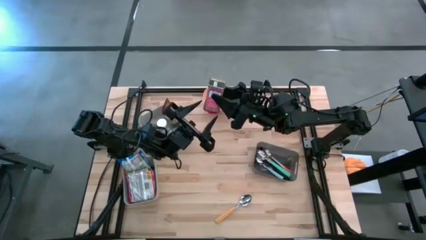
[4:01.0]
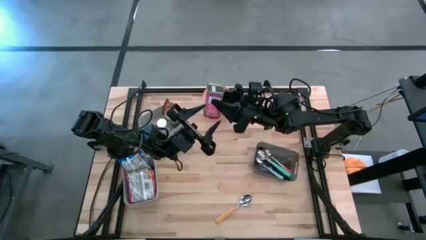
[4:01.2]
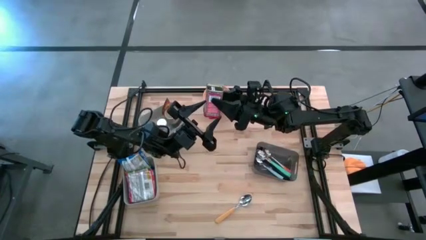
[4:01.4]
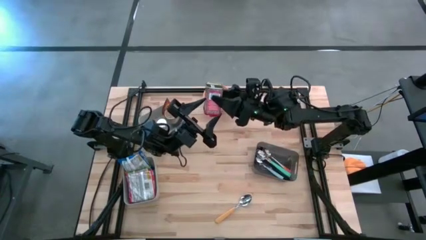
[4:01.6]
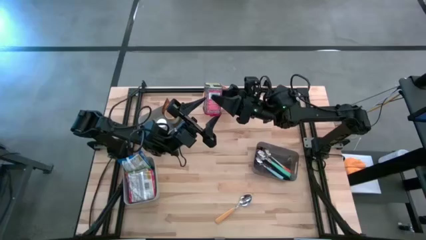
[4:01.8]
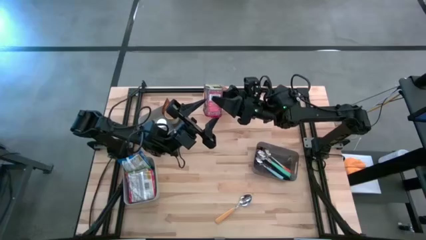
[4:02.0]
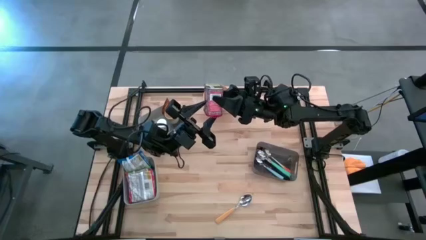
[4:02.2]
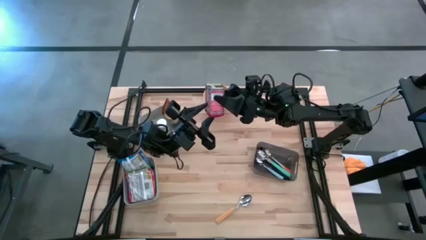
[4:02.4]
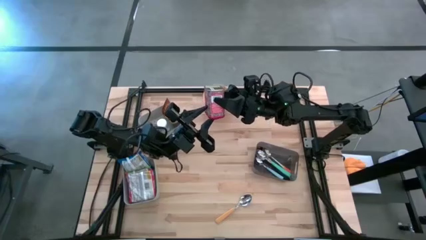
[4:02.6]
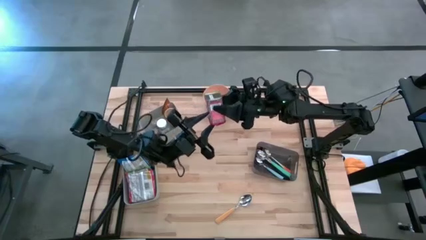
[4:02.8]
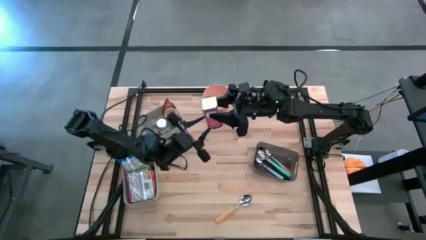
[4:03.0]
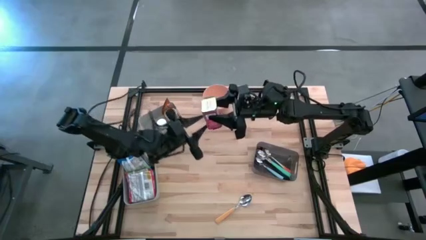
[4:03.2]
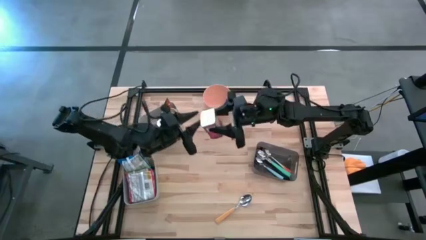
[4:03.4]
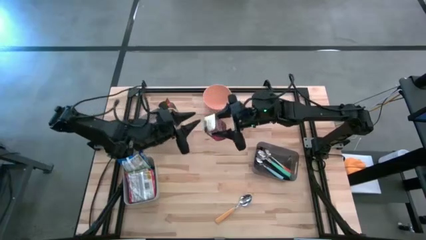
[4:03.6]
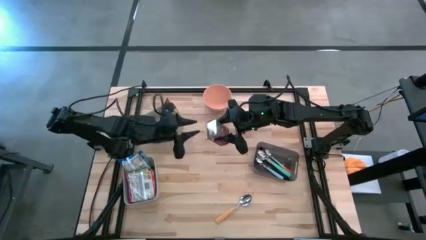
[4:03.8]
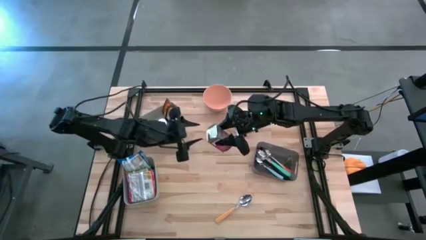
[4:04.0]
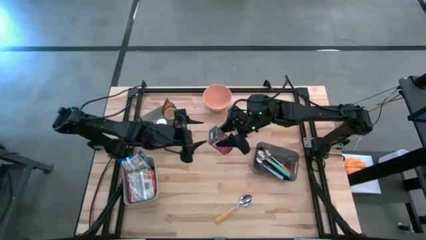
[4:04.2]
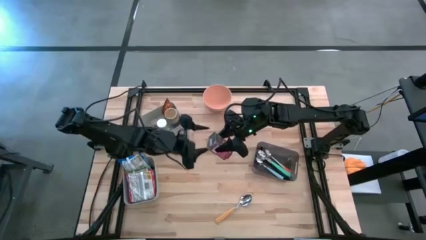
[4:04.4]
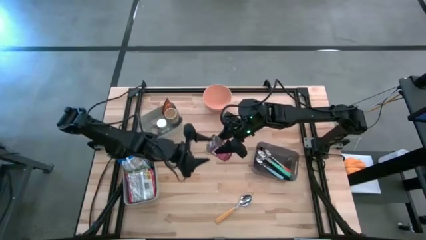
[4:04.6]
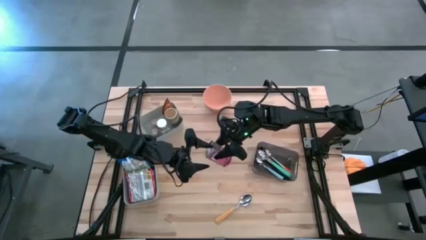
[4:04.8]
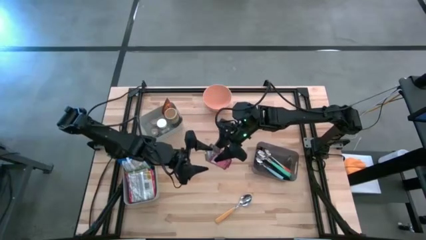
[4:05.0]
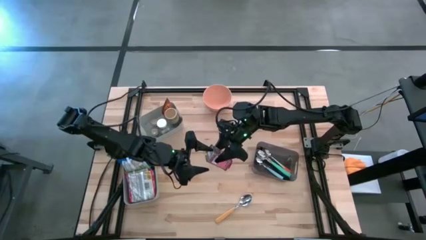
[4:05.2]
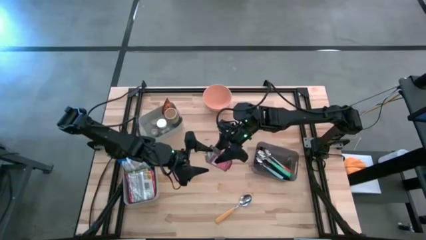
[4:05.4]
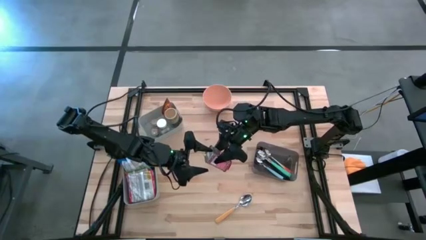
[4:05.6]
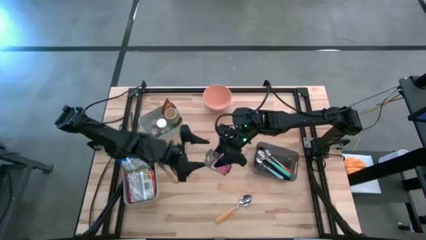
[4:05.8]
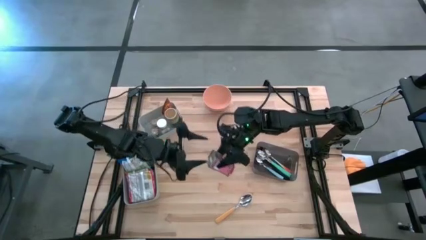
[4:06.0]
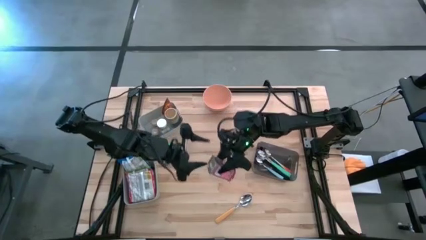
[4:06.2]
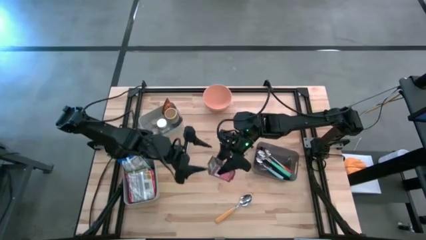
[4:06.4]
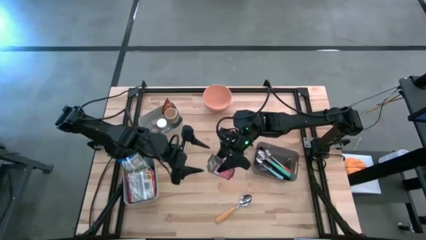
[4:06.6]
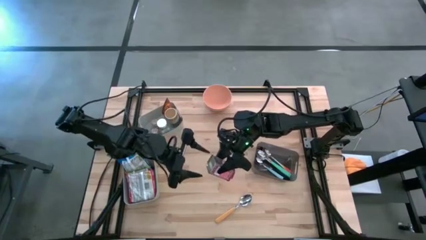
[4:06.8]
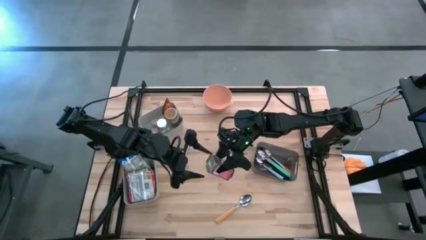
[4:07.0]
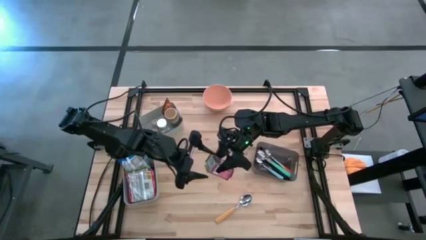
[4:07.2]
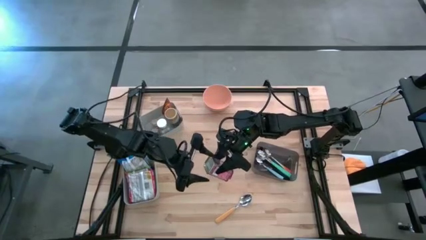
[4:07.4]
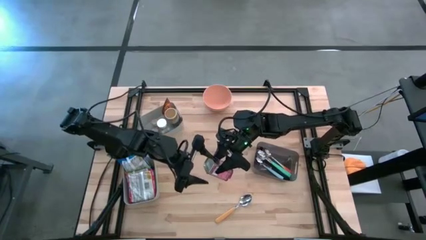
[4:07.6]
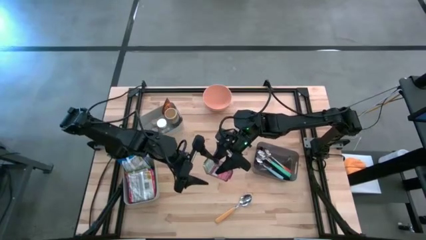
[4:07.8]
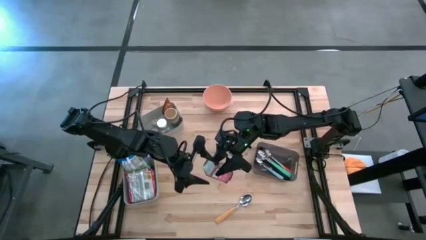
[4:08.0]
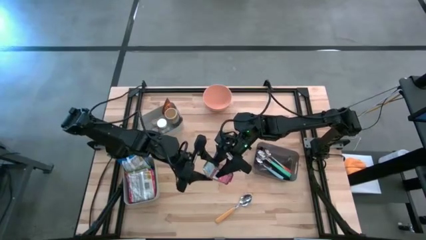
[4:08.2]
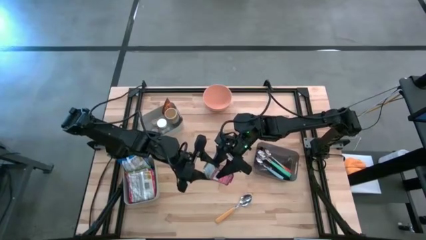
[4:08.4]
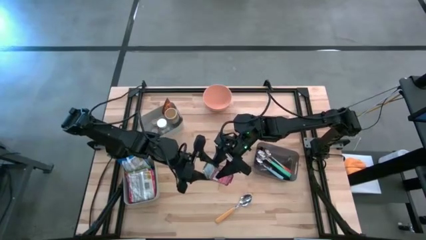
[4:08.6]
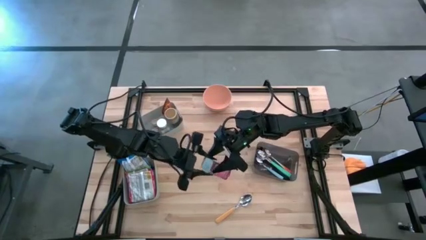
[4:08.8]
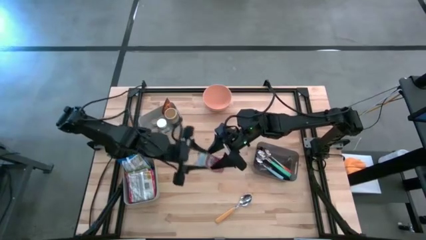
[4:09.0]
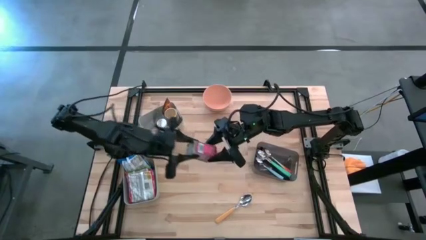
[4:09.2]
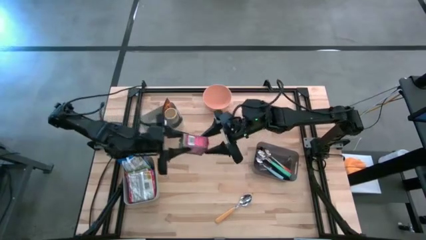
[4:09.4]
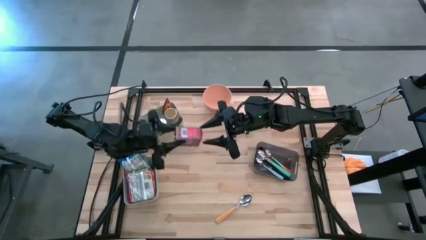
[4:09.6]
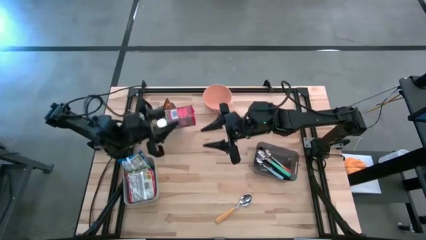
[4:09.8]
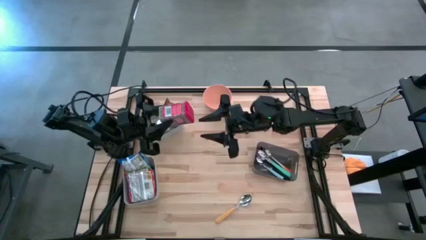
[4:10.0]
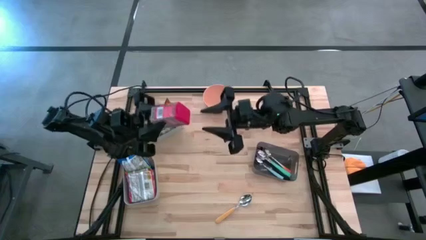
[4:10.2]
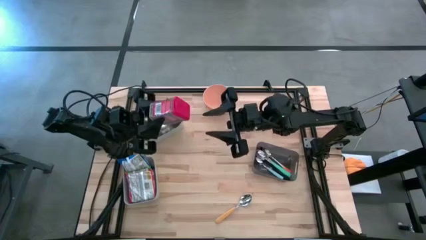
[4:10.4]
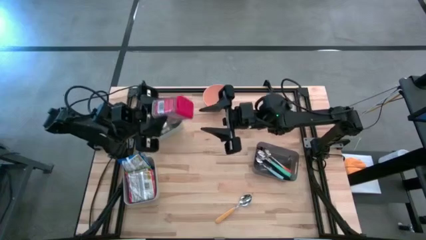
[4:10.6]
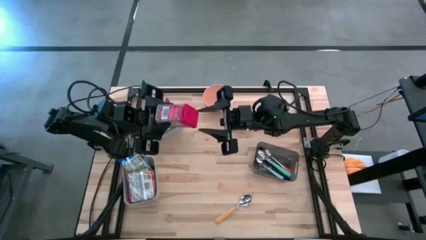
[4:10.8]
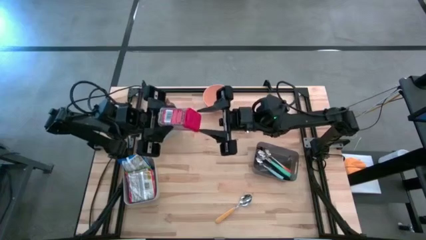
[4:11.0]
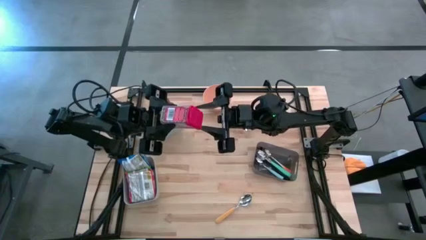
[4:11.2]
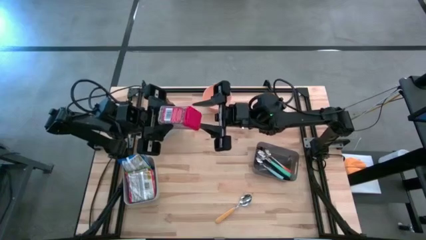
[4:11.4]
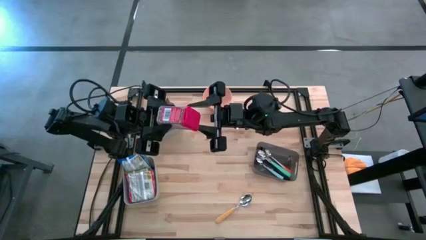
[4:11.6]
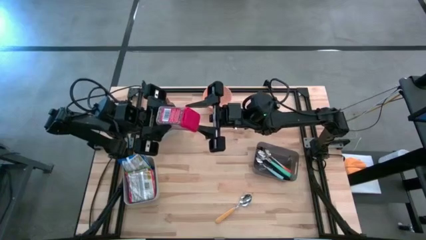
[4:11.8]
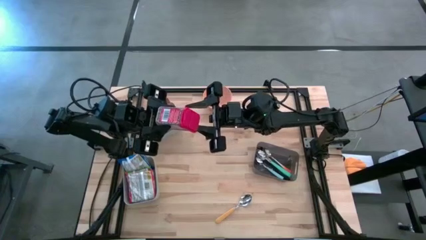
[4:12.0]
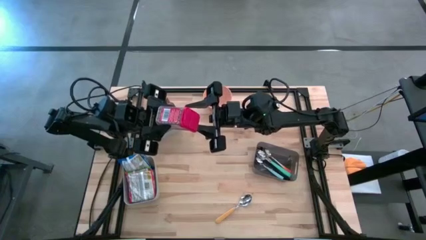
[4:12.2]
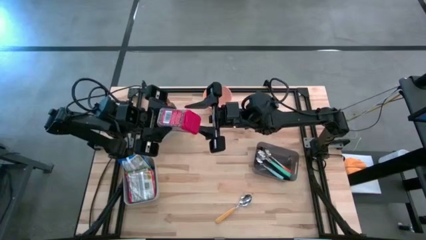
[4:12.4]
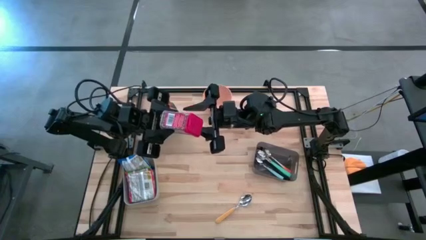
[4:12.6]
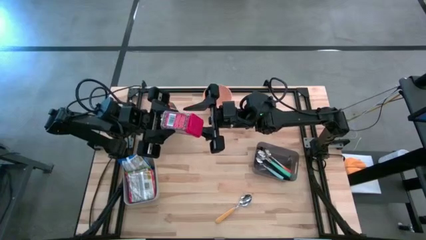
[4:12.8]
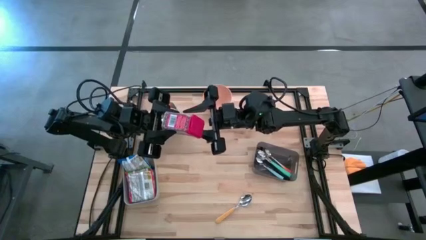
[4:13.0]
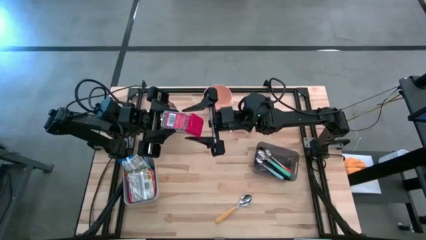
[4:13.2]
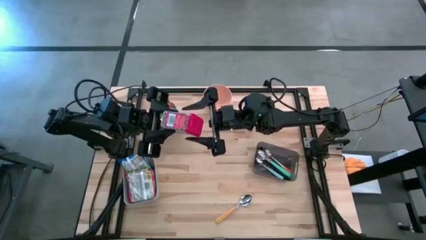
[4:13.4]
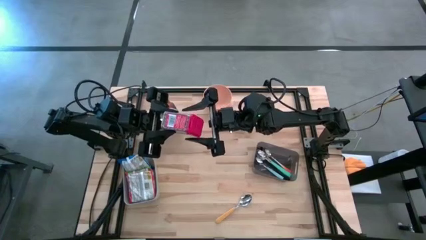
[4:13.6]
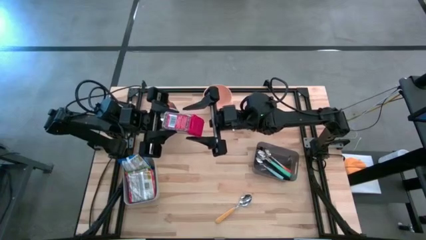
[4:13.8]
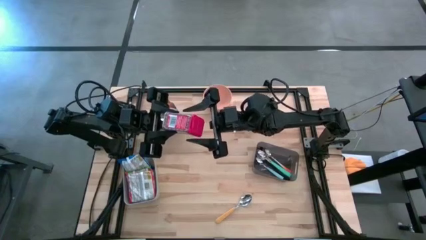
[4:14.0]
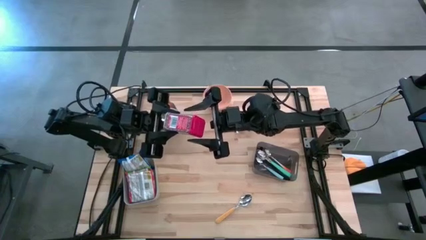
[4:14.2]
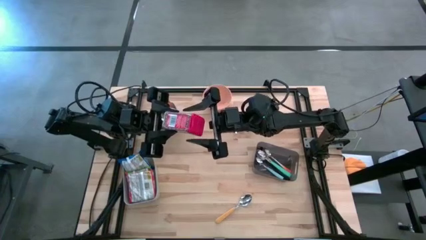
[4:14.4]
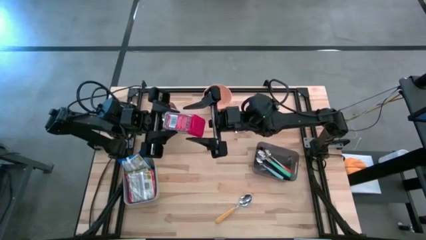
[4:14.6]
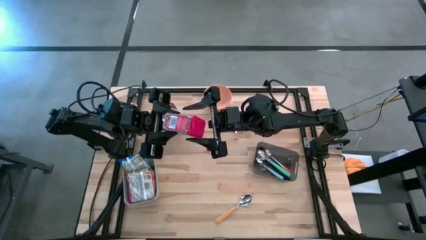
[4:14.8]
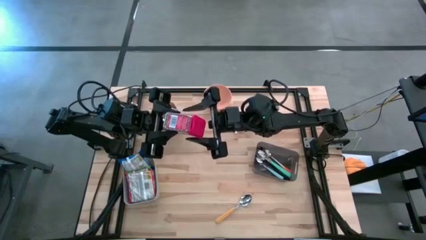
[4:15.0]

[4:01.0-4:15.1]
Put the red seasoning can into the top gray bin
